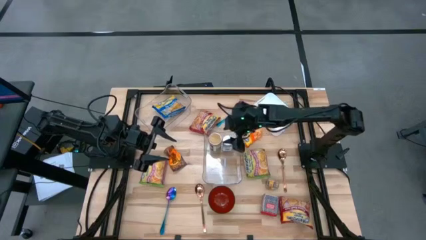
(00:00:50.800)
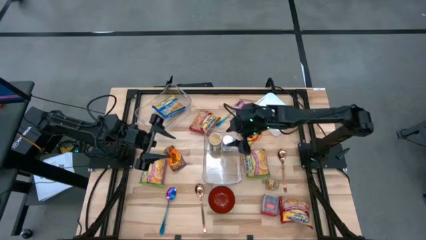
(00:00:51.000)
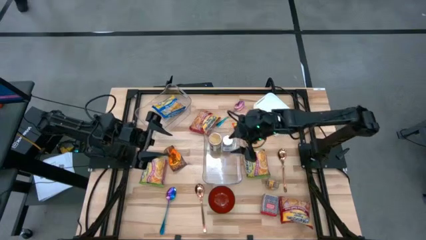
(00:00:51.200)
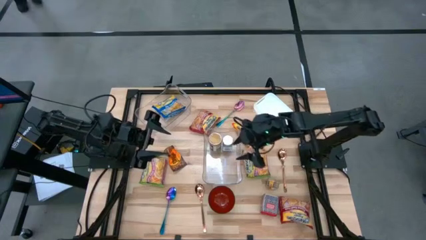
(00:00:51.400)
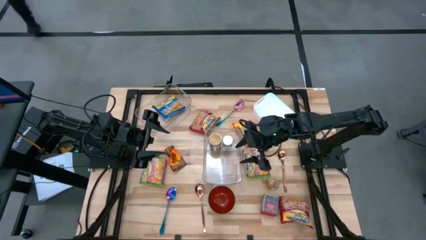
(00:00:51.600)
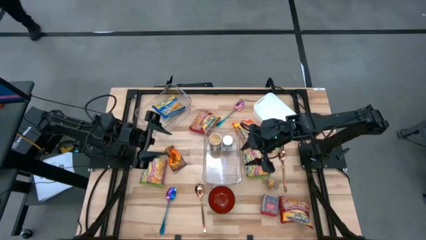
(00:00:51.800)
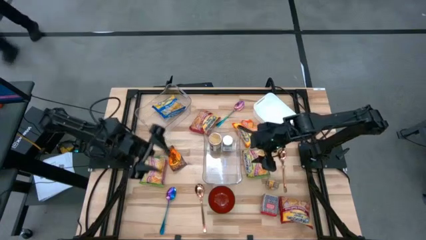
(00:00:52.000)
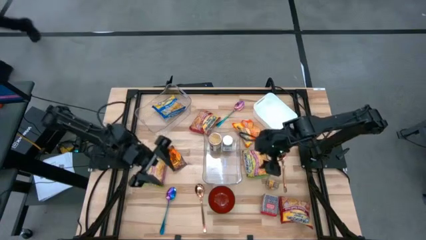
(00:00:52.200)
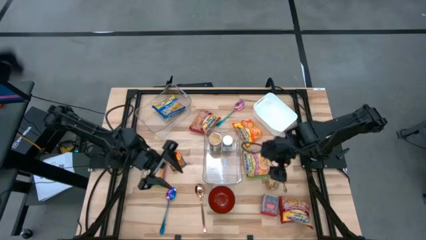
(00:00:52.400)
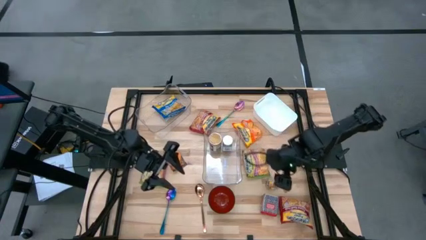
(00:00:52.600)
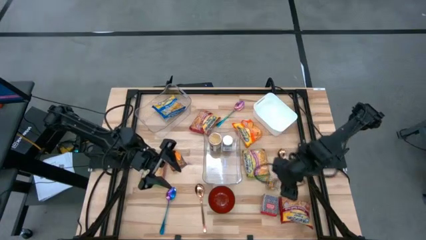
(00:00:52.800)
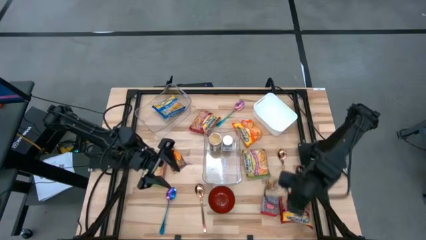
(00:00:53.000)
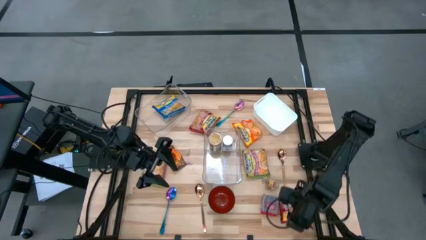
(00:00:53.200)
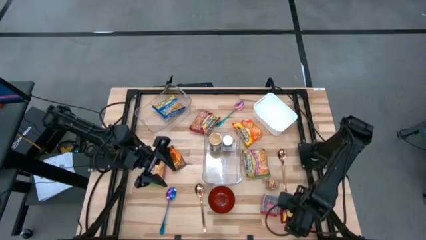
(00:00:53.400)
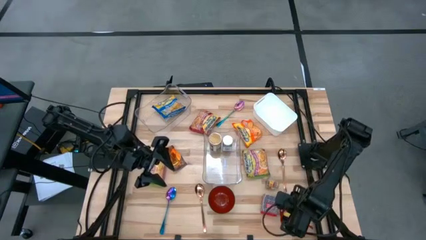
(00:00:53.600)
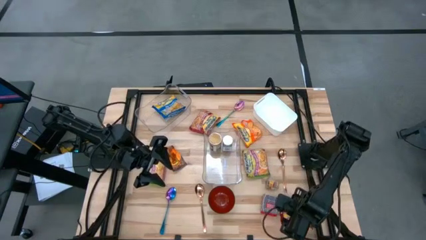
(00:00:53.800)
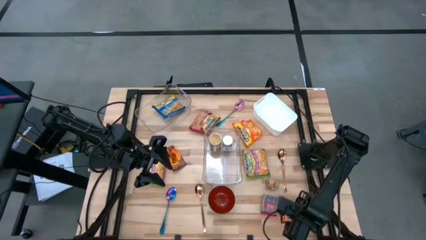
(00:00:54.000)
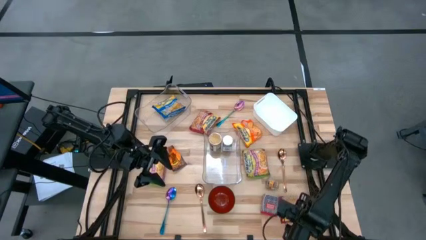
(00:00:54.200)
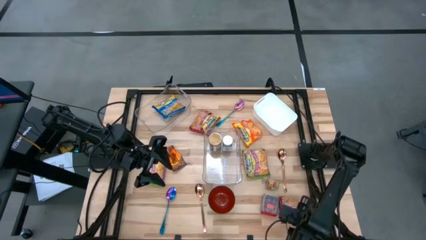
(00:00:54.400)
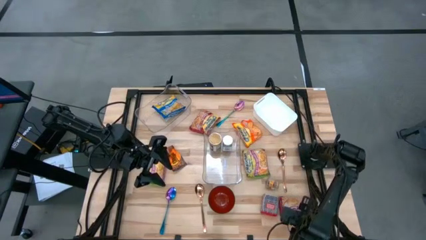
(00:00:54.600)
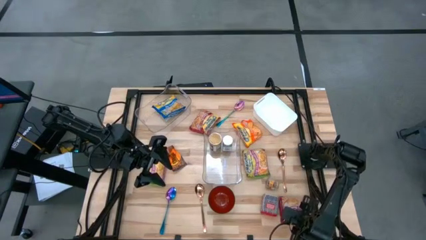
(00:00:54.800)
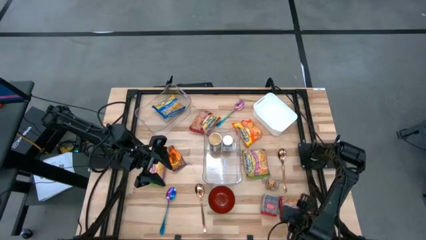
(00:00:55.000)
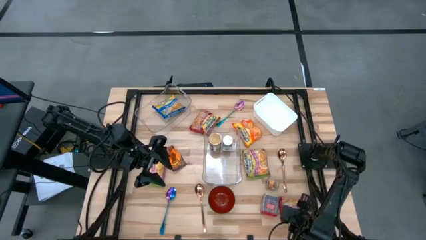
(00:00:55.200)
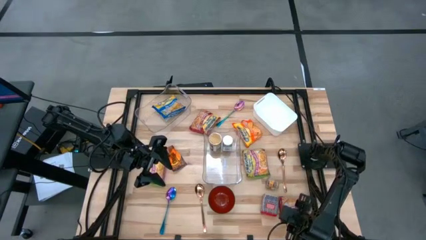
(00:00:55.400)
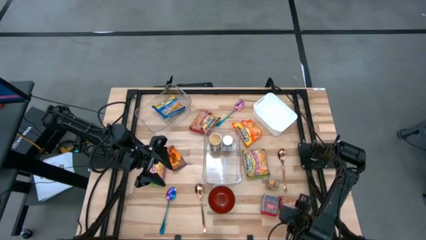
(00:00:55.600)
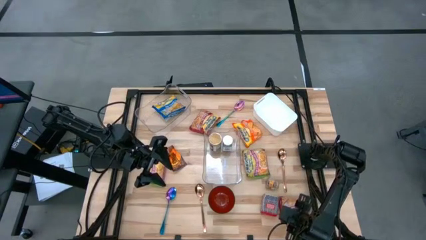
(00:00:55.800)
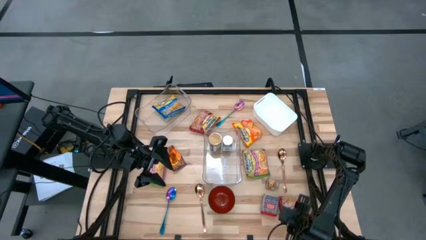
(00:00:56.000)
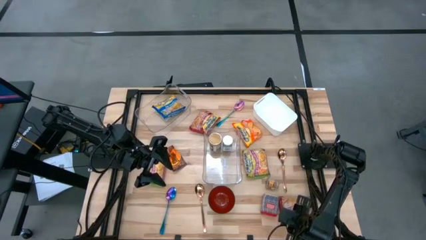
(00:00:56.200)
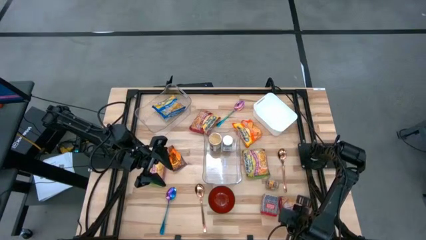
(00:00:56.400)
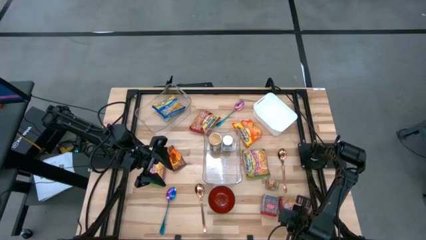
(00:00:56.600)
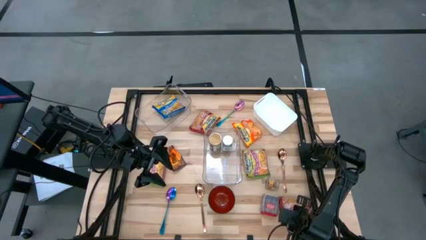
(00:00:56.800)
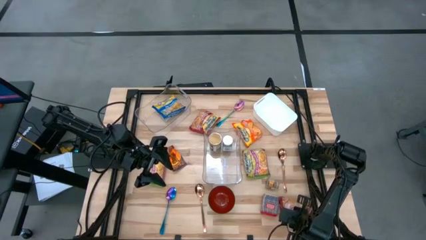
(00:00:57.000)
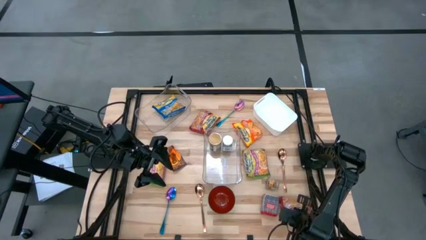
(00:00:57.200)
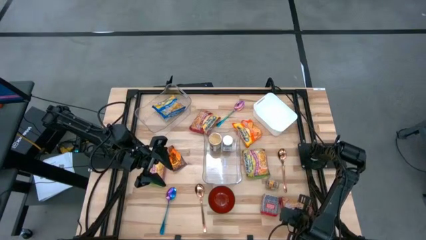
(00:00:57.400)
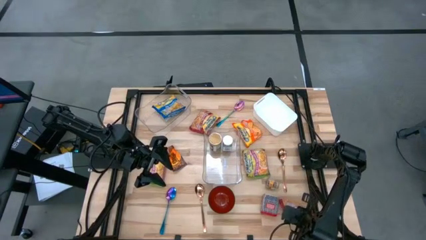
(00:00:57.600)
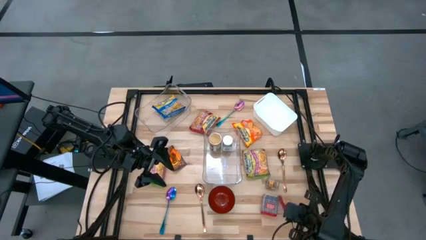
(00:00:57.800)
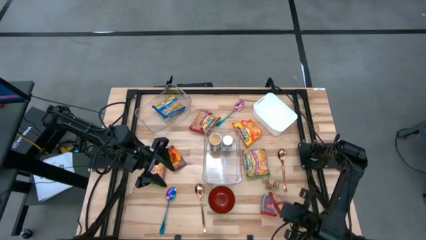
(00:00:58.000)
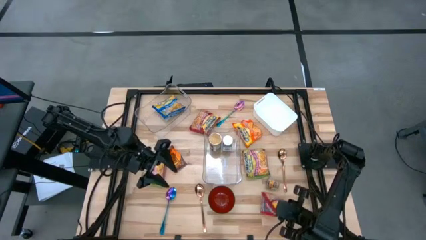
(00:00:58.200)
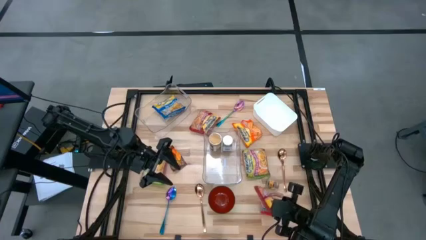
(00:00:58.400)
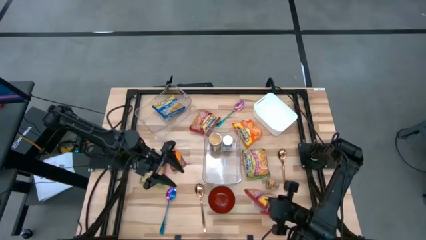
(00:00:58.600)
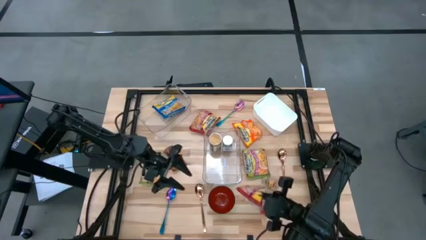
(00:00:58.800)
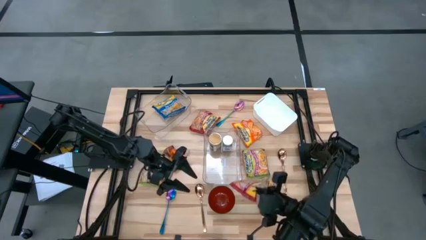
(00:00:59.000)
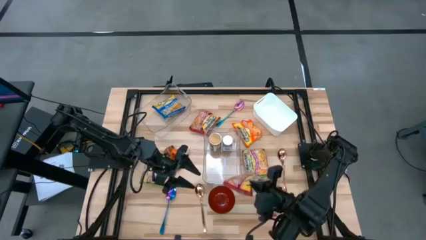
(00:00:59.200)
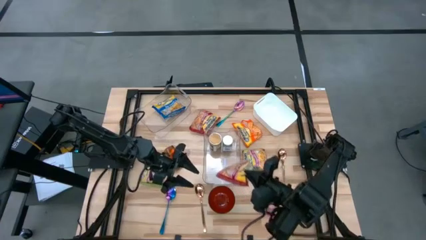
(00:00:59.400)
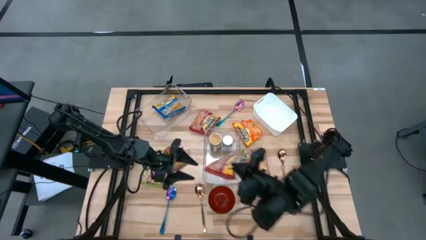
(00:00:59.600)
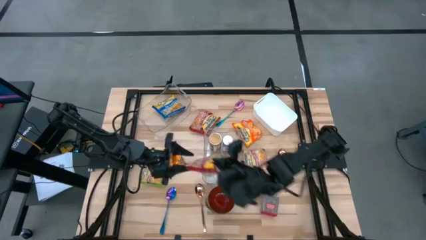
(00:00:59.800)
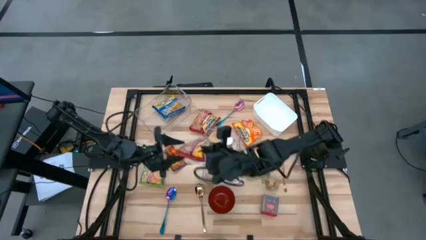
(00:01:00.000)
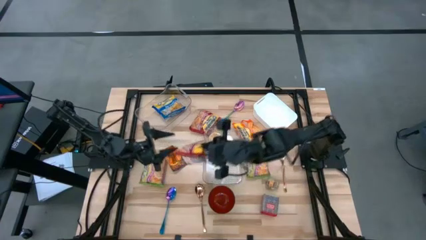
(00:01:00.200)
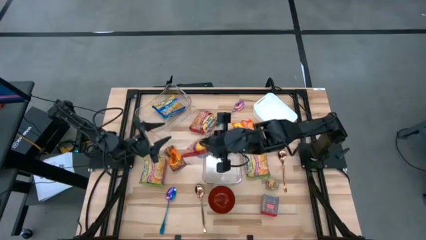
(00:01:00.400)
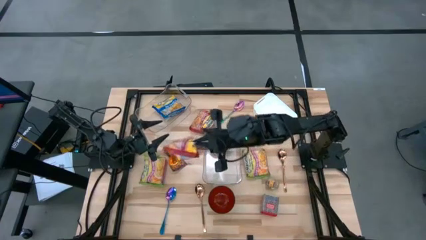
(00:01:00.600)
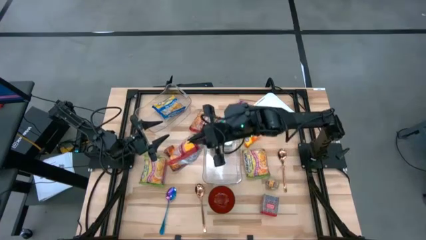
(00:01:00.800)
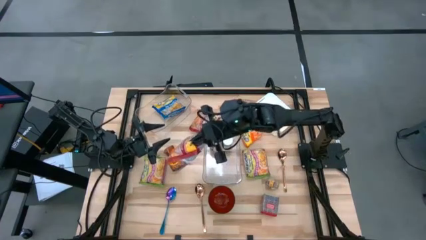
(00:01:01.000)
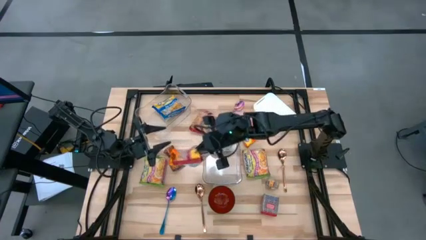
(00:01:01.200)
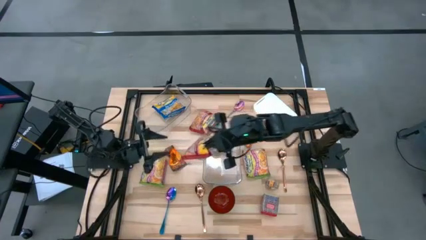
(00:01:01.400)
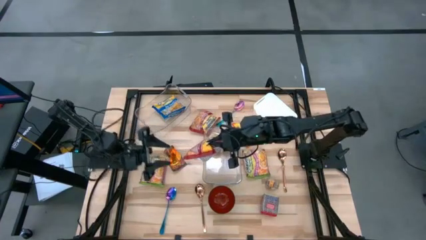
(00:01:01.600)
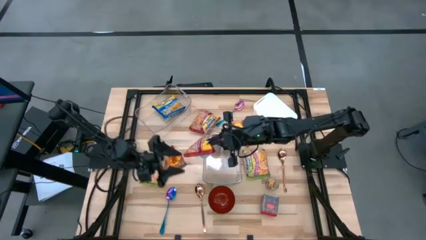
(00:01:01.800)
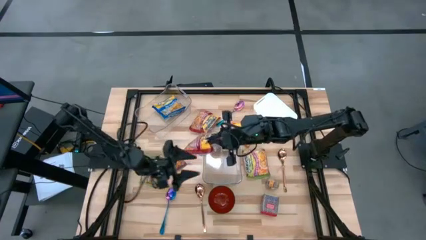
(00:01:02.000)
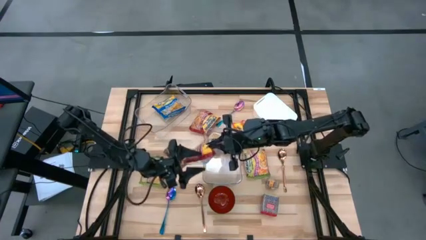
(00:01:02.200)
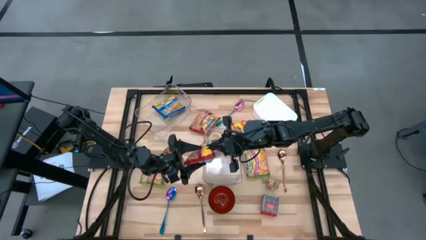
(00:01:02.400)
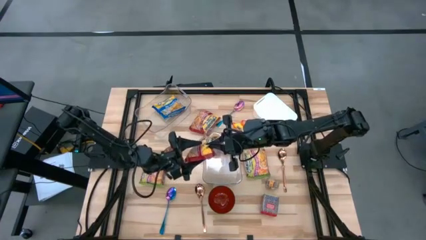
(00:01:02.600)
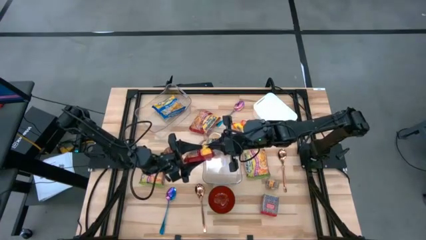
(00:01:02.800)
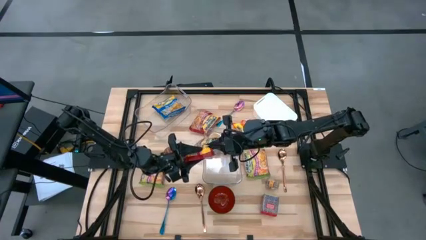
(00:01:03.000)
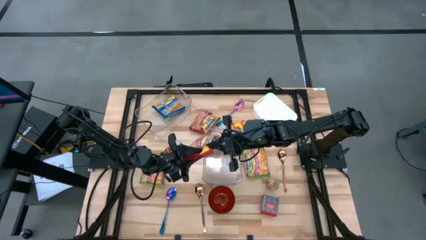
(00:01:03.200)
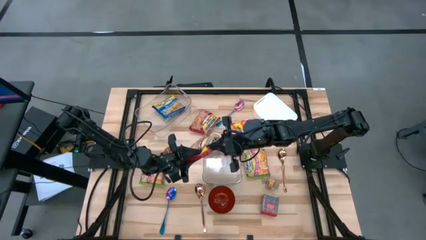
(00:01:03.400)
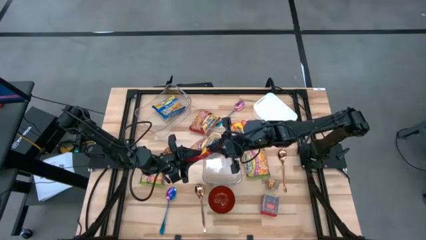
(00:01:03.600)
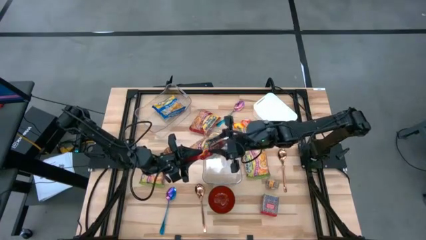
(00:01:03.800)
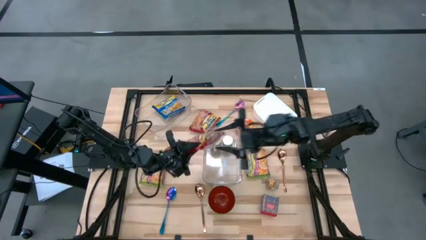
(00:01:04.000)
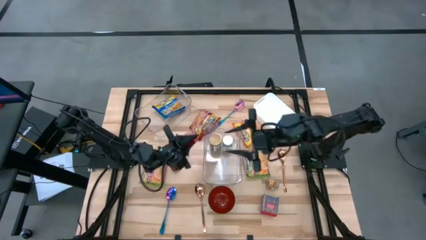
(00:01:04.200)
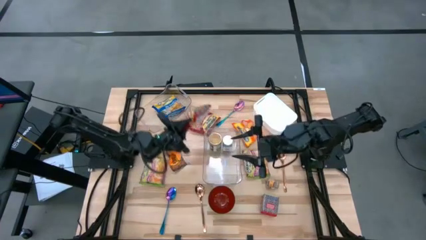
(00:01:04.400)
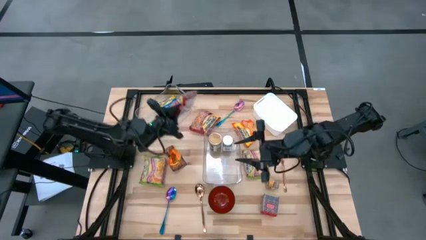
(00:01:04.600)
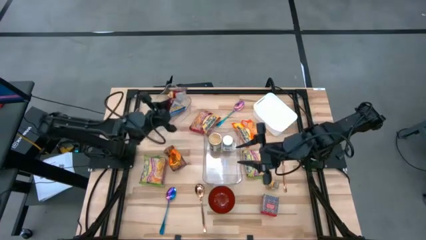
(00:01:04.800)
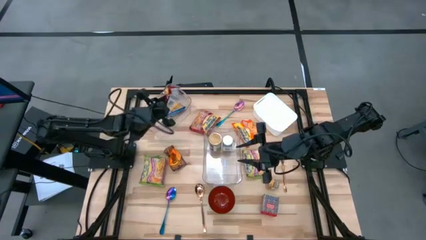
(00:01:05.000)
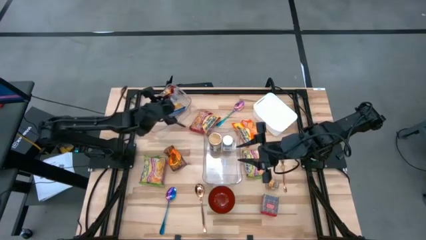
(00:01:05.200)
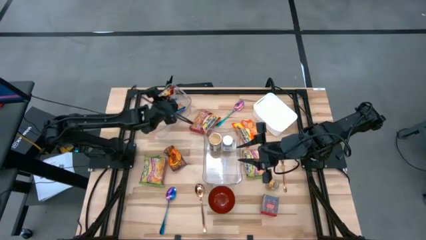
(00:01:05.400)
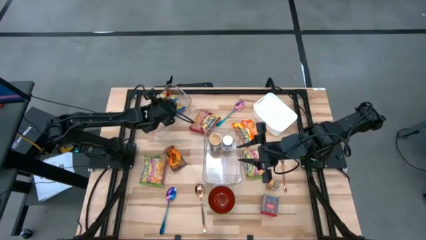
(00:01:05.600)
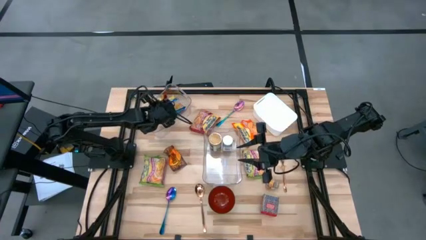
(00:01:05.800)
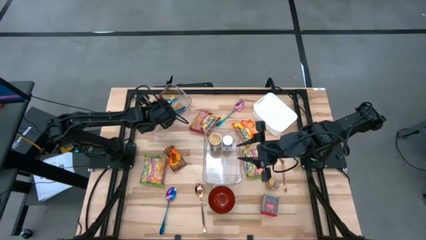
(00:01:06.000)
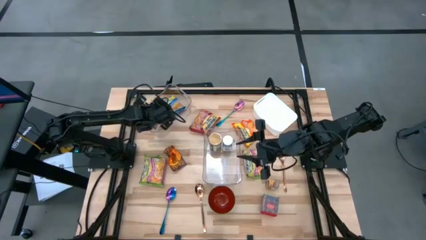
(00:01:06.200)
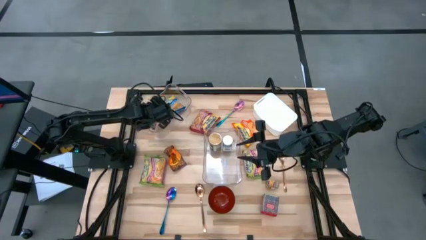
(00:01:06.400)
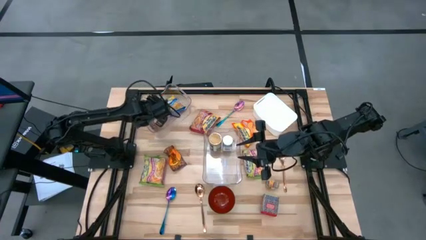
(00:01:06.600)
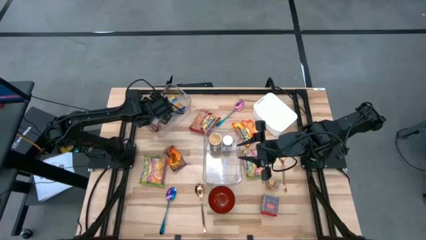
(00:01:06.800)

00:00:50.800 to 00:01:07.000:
Task: Pick & Place Food Item
Put the bottom red noodle pack into the top transparent bin
